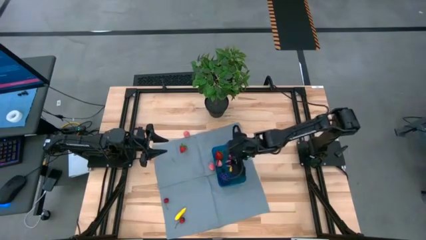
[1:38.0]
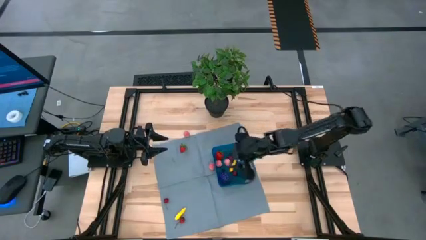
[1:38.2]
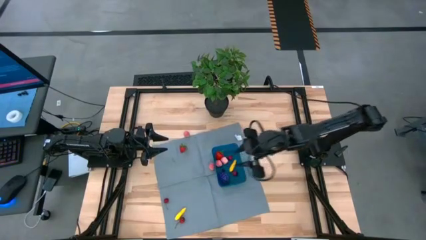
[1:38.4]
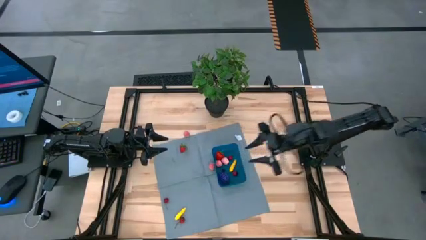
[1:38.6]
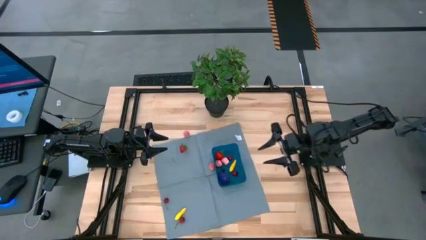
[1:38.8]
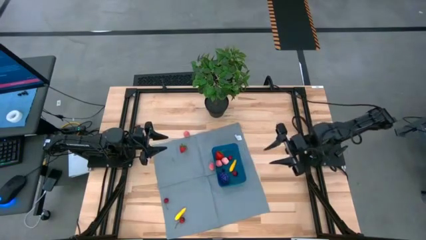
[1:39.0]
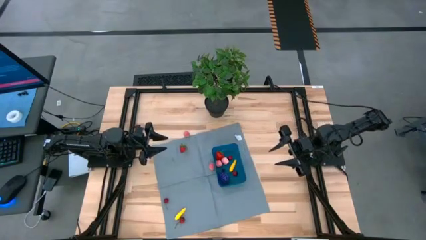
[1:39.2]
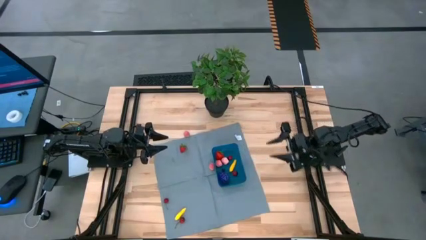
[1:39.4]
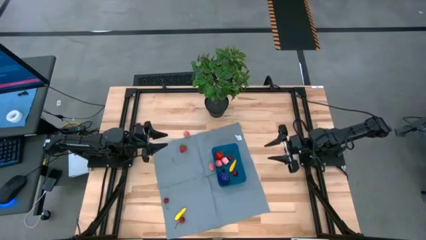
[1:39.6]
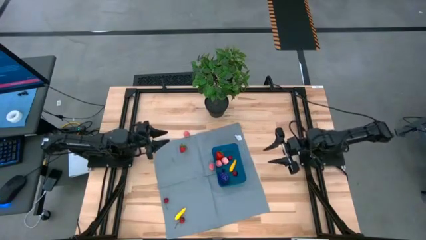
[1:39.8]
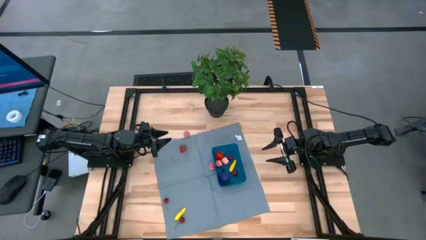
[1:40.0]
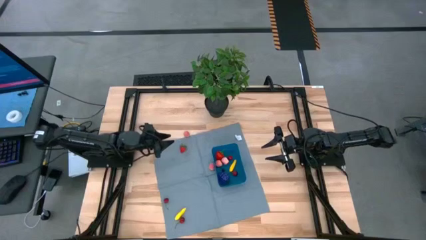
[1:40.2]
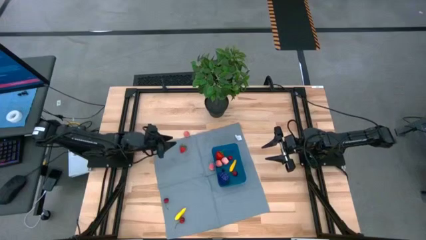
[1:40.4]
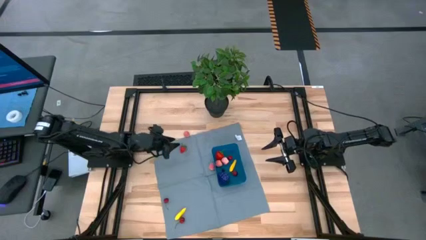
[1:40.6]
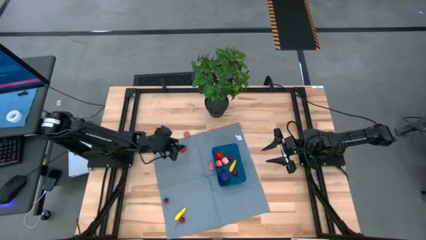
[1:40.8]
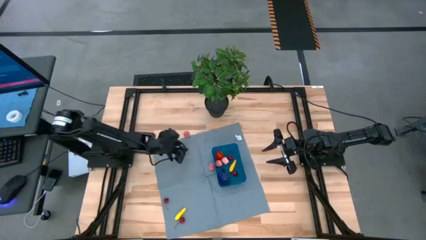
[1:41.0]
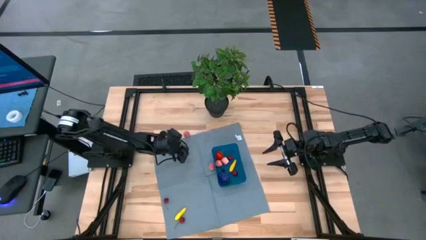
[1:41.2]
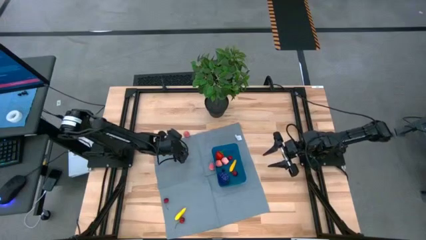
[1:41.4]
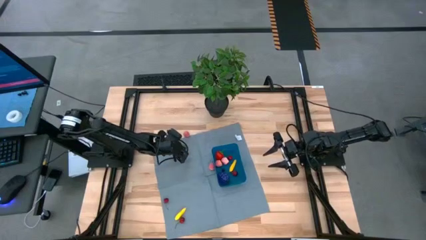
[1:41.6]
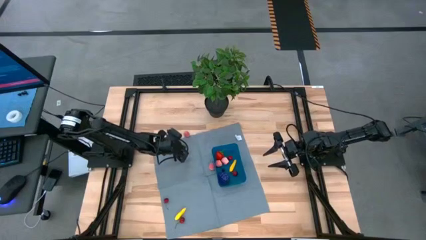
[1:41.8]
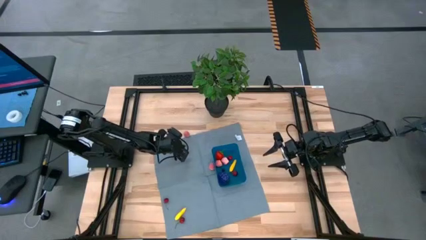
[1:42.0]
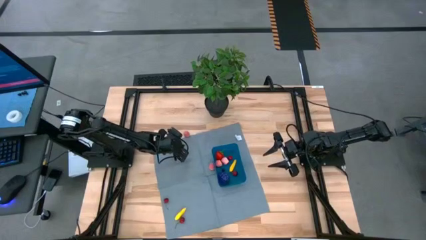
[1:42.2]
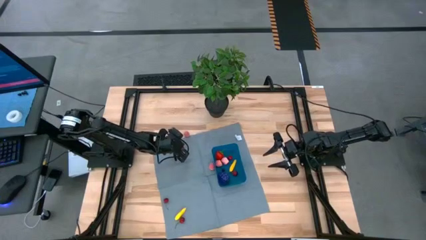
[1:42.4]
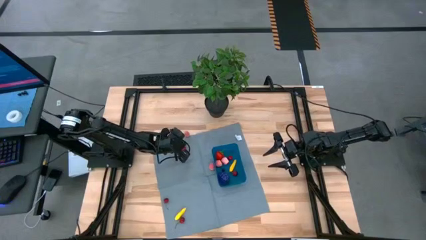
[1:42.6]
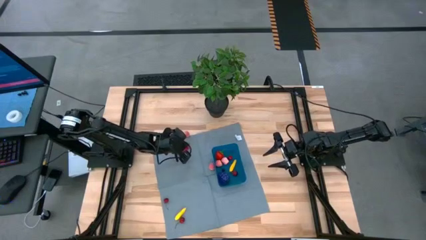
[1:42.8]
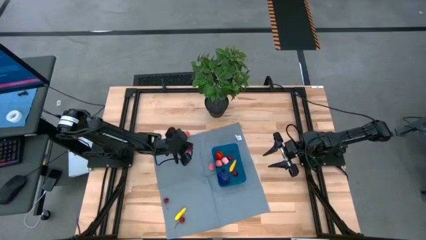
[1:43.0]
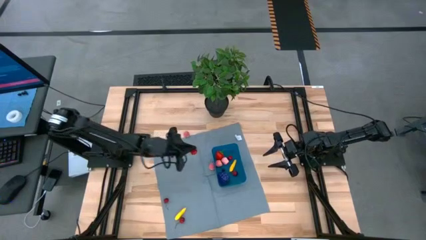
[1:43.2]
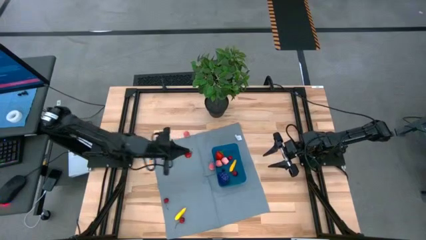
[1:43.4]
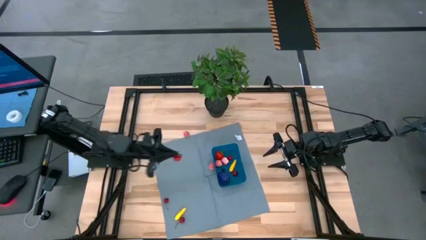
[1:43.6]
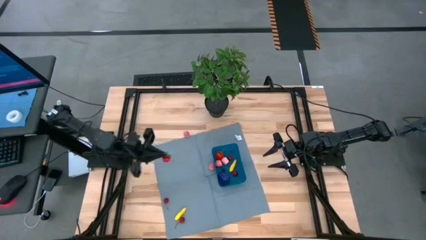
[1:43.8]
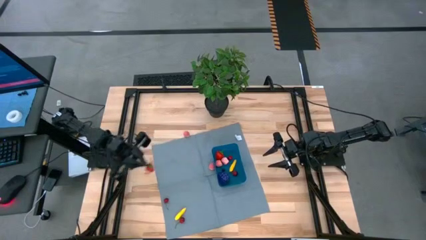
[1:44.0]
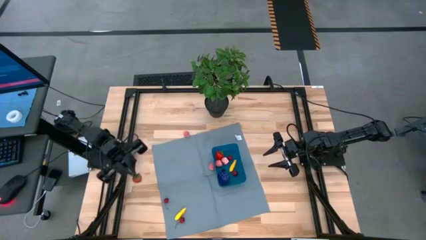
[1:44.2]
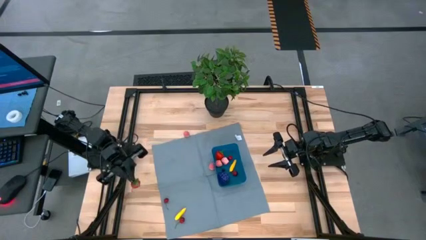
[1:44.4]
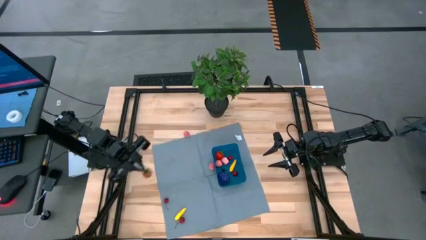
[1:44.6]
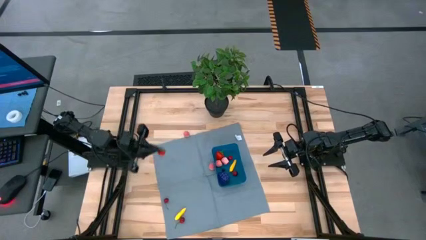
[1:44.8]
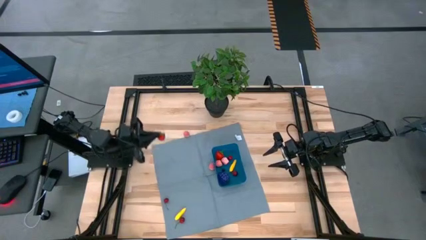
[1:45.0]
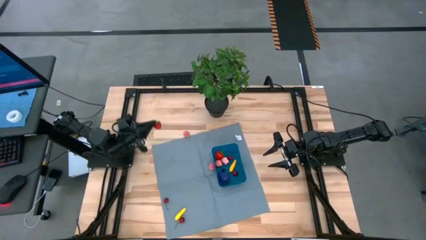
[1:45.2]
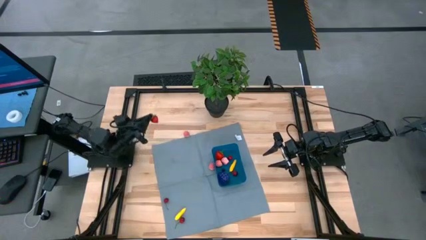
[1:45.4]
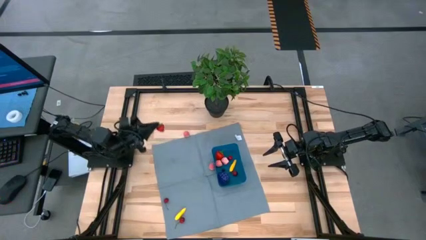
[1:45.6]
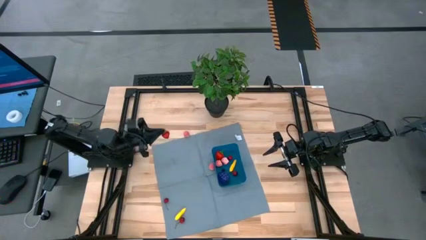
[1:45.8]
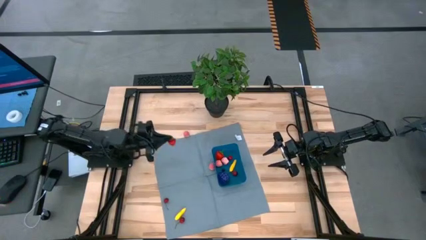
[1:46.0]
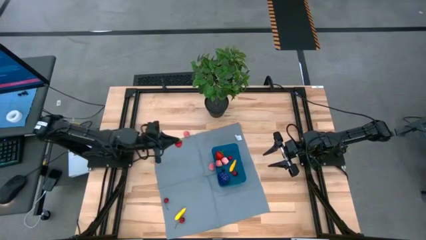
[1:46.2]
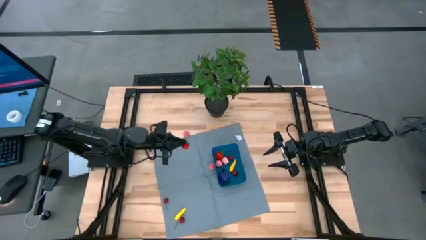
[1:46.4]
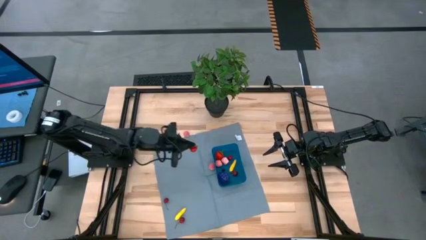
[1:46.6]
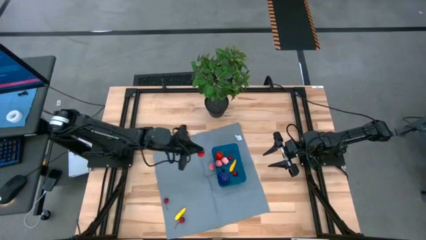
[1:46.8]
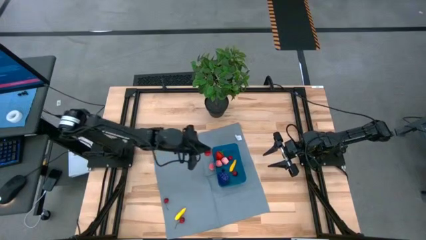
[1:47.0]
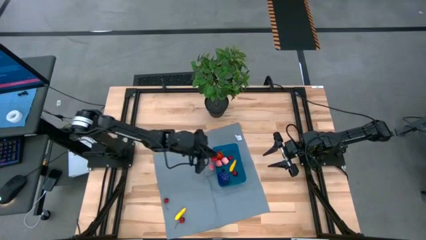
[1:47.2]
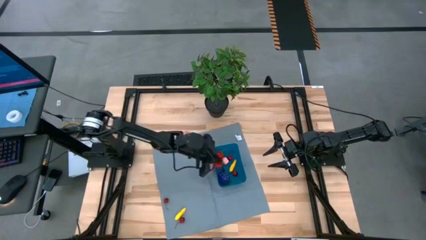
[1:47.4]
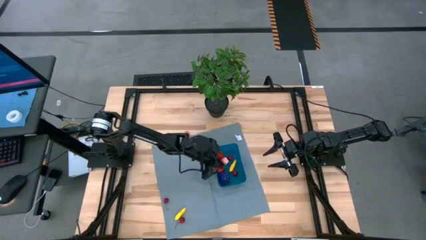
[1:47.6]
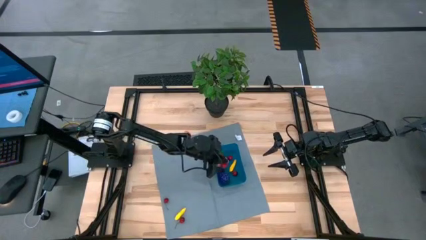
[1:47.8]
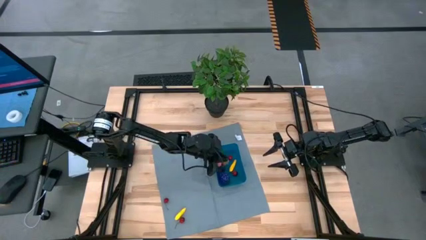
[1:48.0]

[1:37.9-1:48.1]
Task: Pick and placing Produce into tupperware
Put the strawberry into the bin

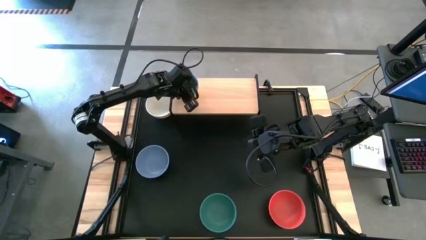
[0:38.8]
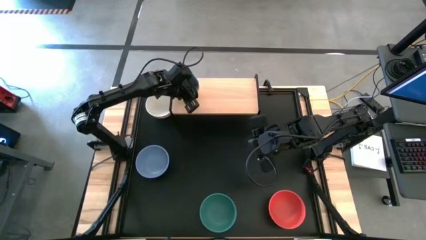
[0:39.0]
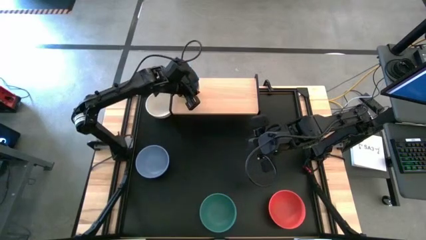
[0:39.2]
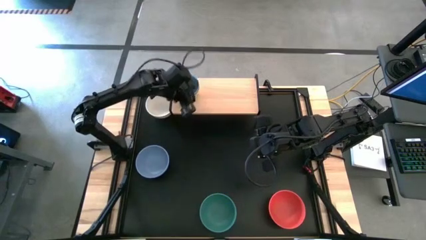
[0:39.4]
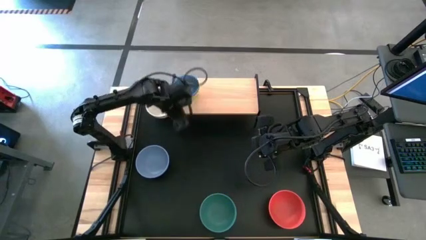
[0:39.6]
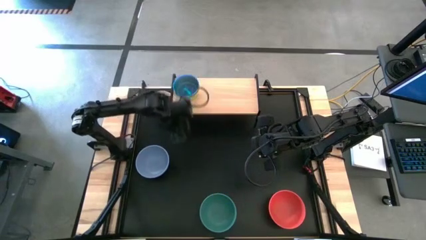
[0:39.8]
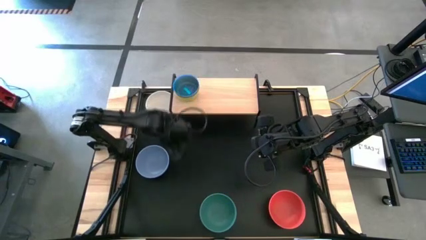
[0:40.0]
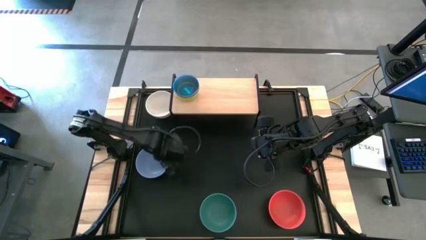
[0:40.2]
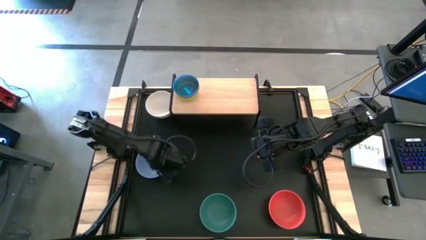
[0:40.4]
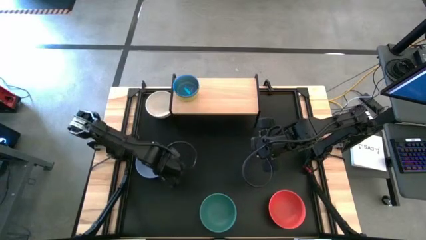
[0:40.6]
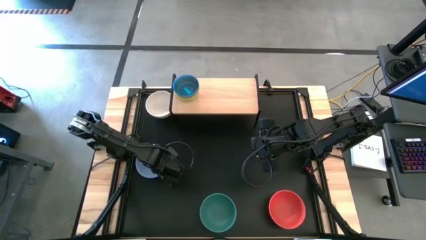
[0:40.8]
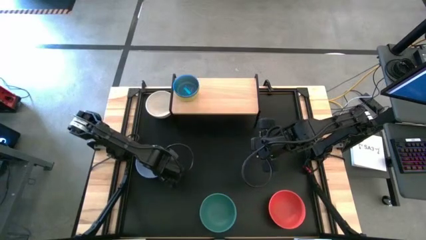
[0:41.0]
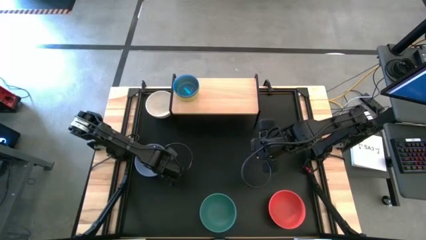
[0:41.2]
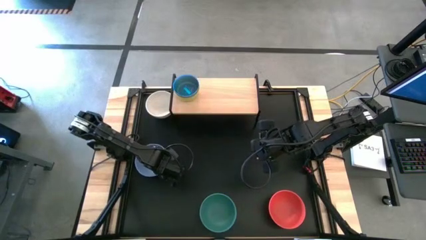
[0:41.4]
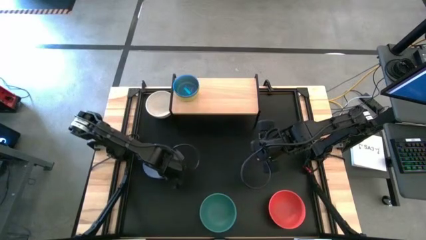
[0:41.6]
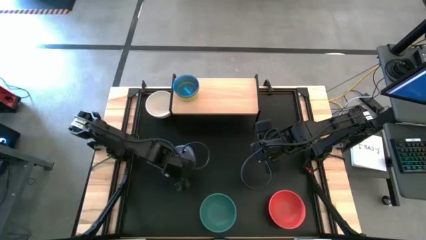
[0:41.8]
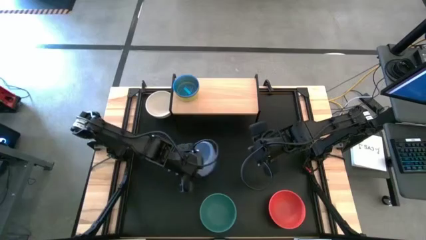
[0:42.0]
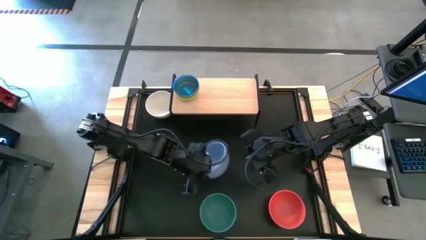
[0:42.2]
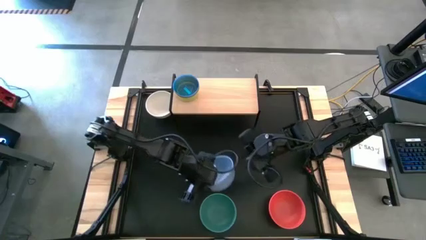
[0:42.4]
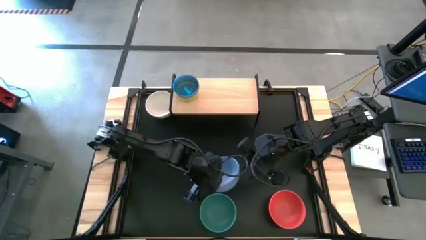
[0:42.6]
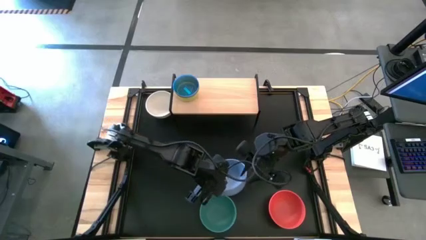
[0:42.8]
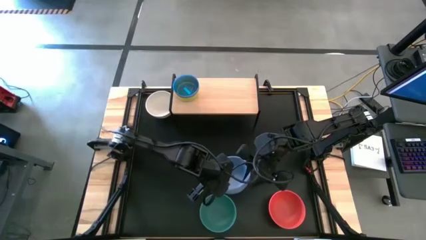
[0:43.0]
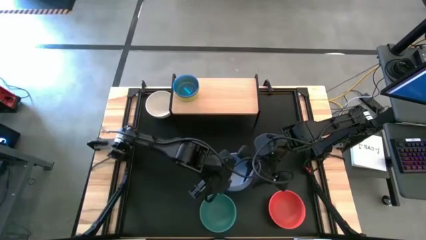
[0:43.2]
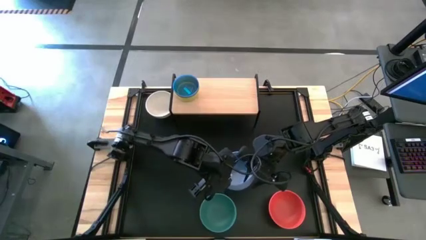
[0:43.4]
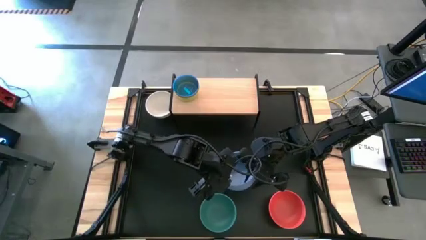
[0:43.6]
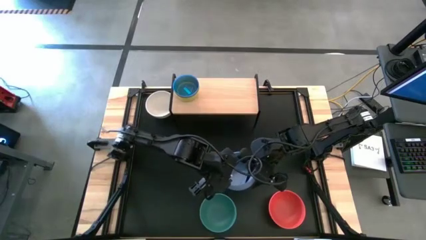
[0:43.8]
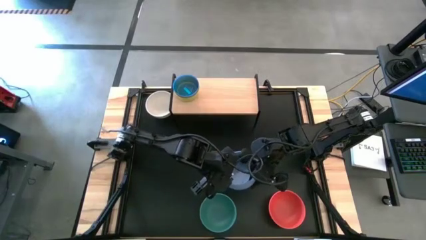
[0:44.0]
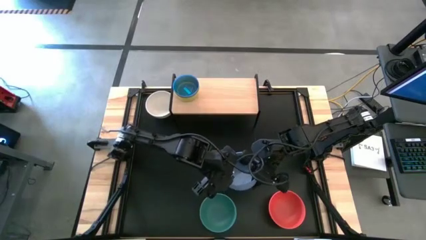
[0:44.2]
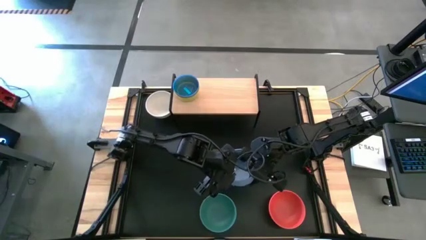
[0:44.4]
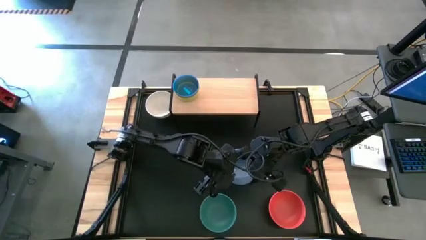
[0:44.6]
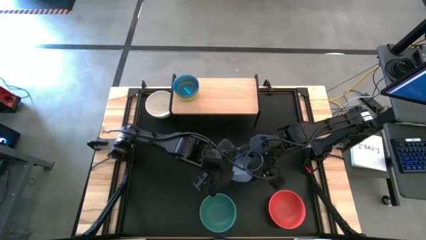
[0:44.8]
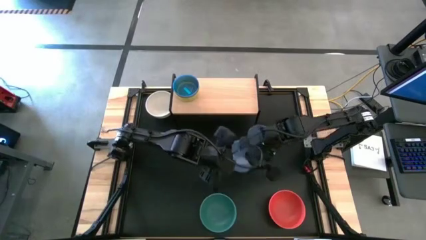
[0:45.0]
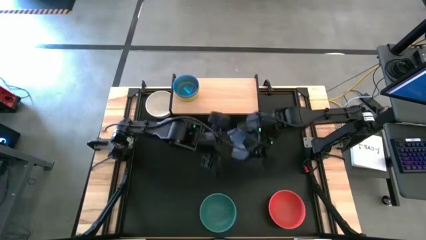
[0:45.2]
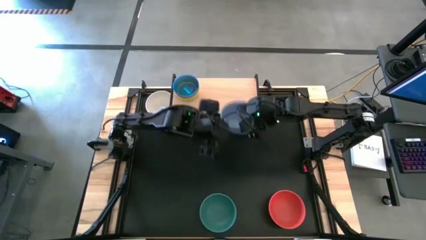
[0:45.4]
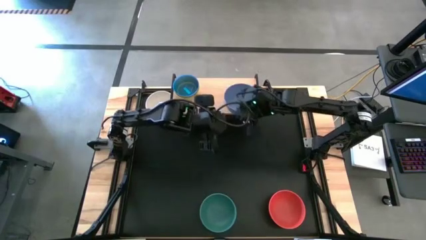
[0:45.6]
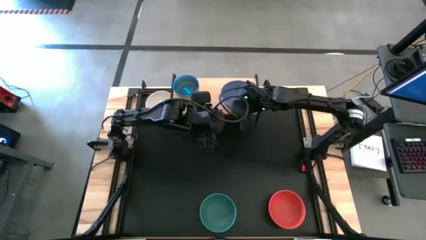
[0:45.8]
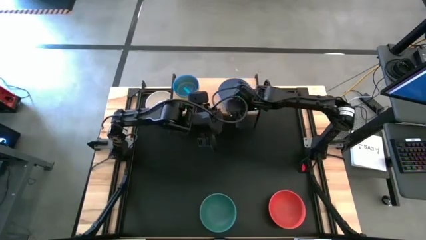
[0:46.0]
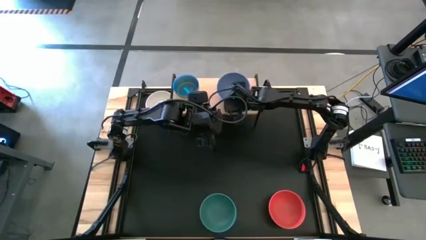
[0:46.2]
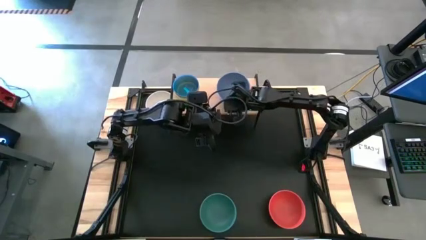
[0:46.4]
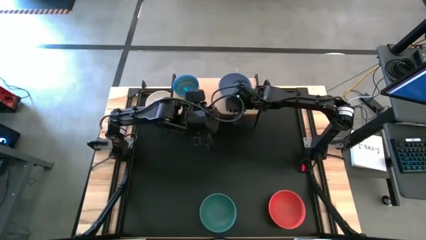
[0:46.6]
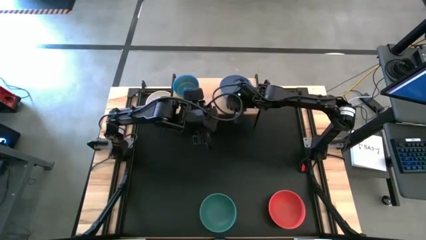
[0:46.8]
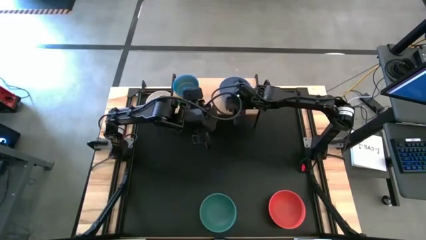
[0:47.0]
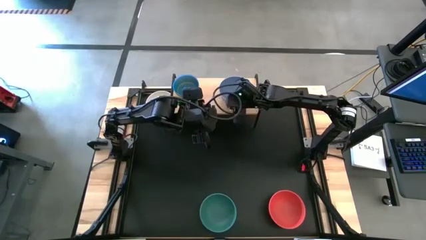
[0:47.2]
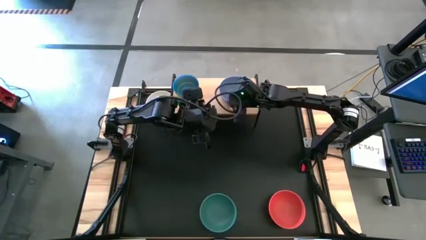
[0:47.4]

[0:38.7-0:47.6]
Task: Place and stack bowls onto a shelf
Put the large purple bowl on the shelf
